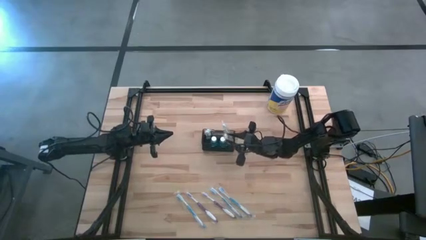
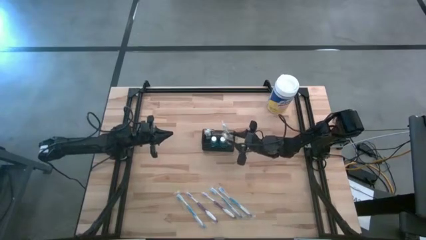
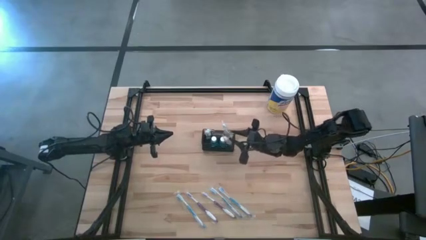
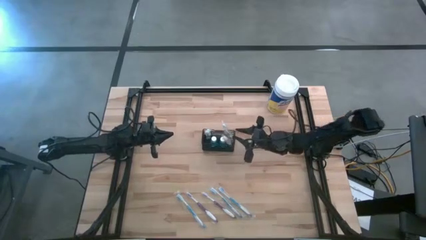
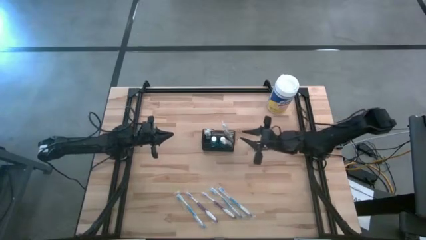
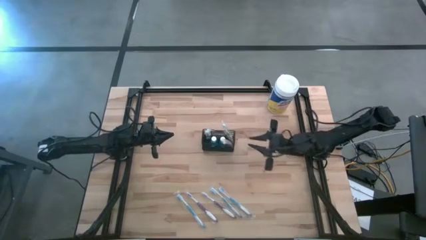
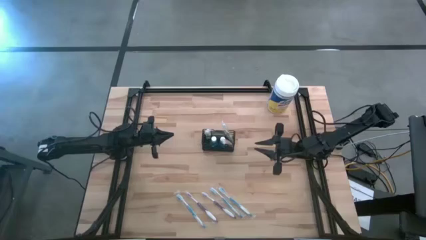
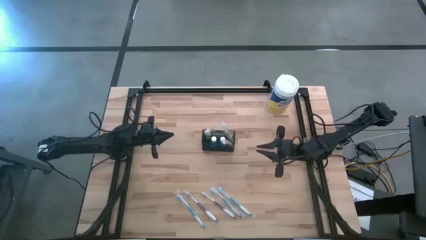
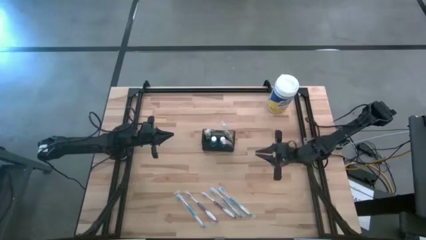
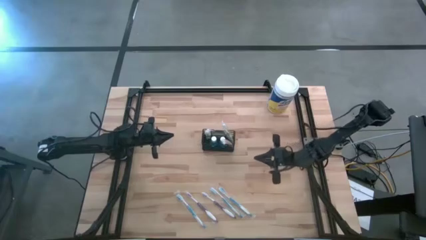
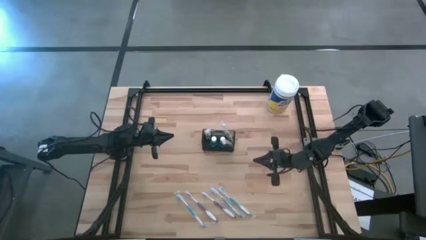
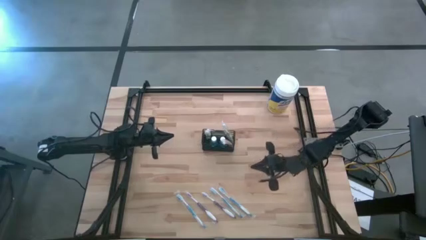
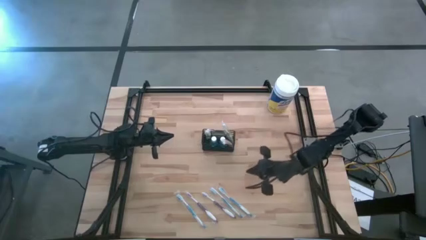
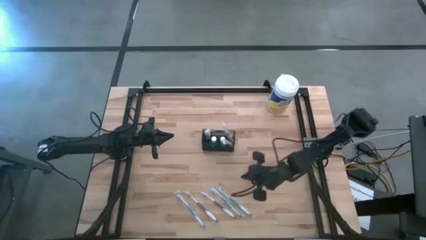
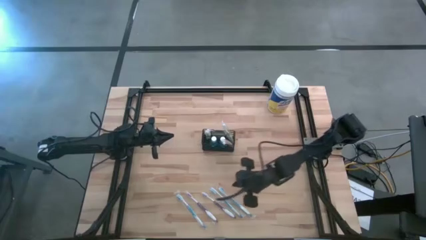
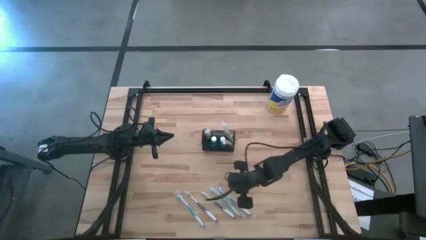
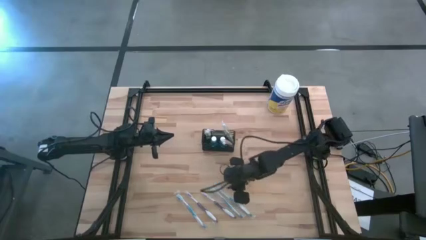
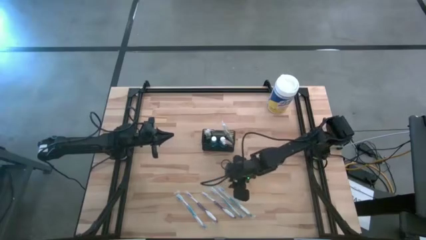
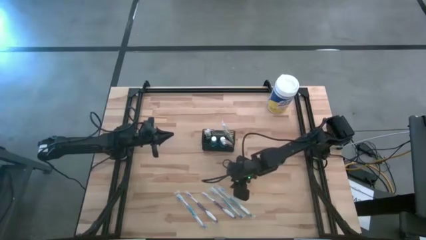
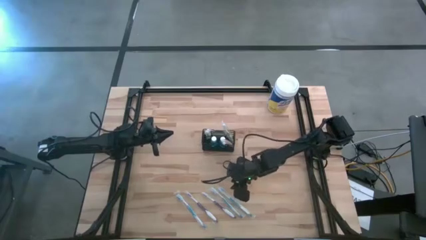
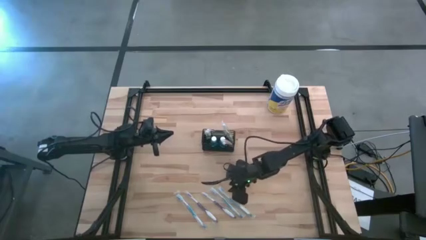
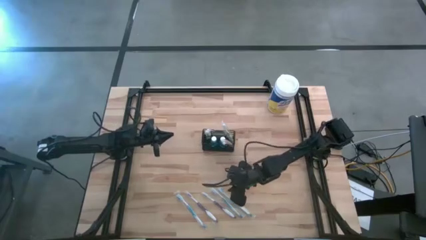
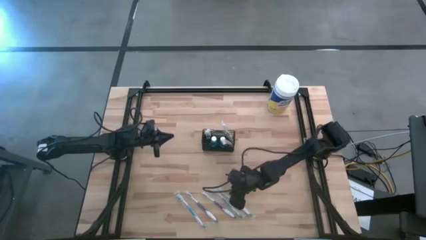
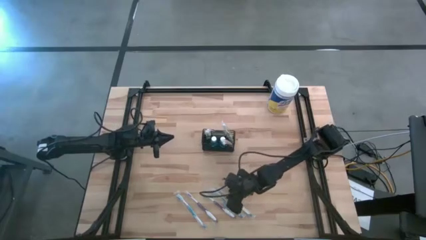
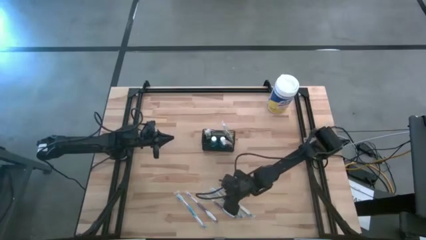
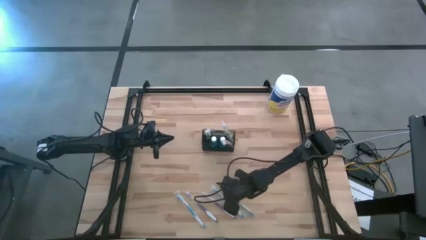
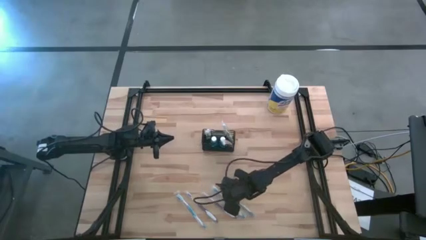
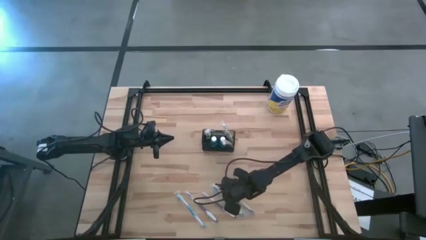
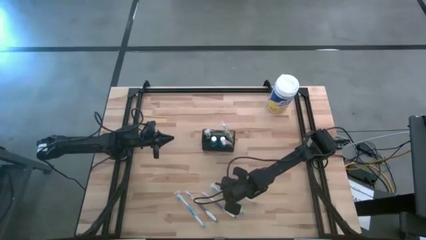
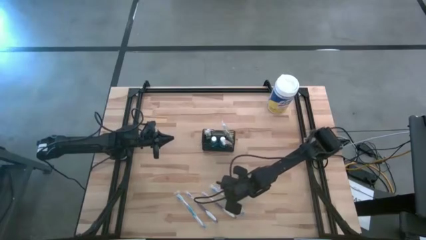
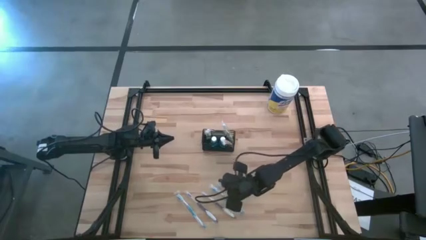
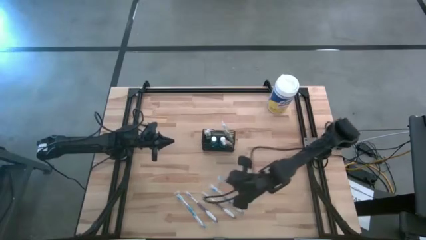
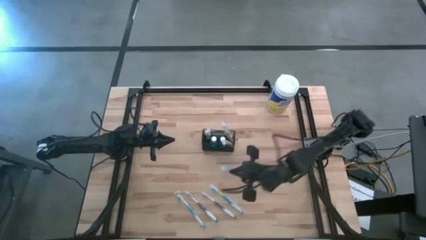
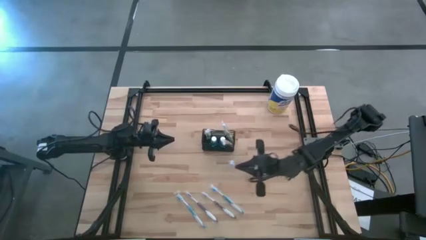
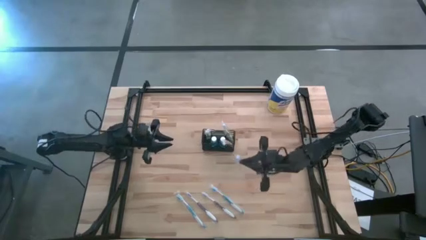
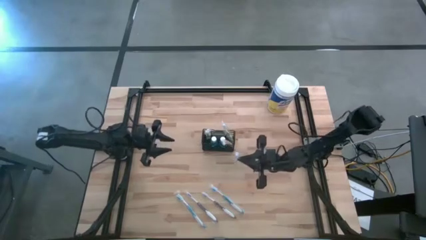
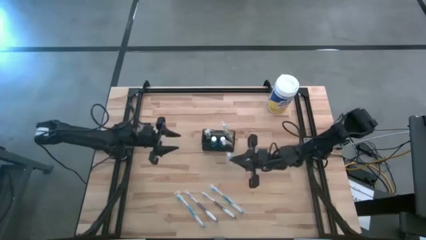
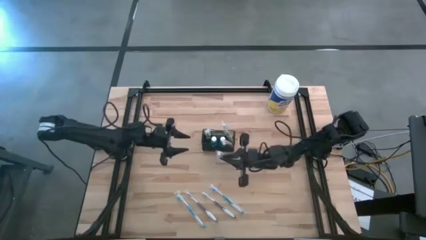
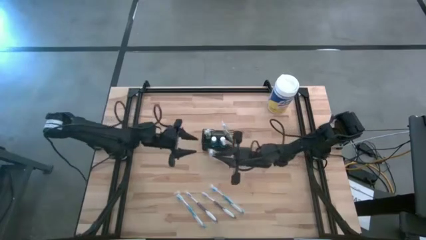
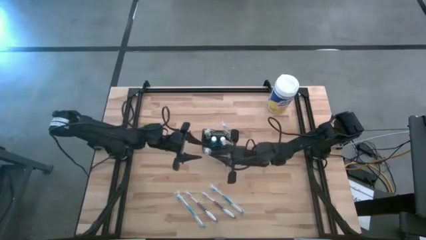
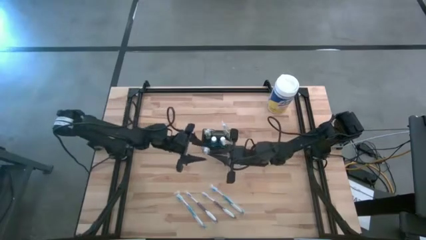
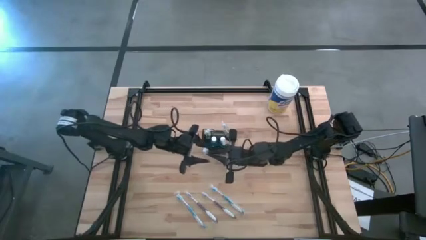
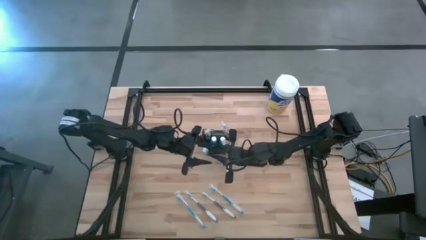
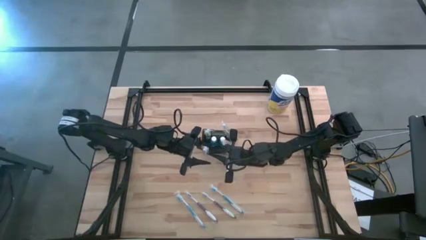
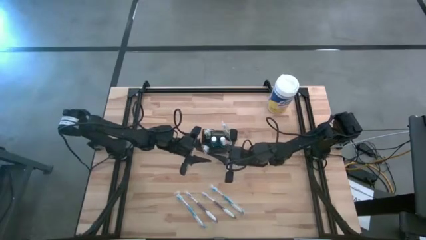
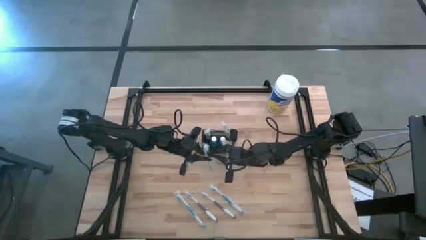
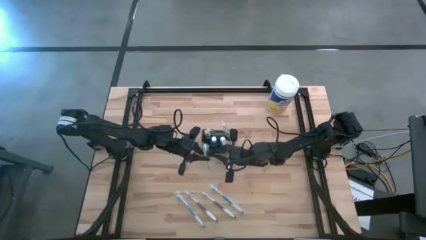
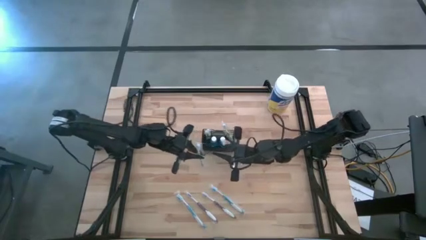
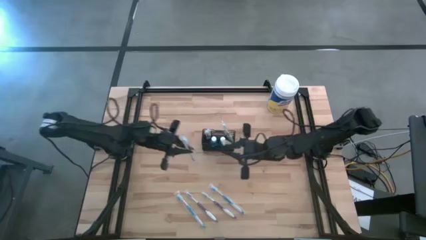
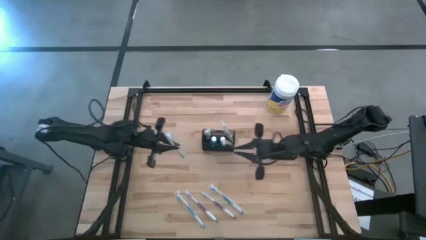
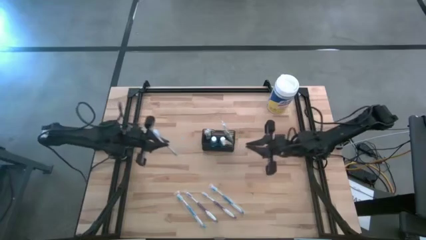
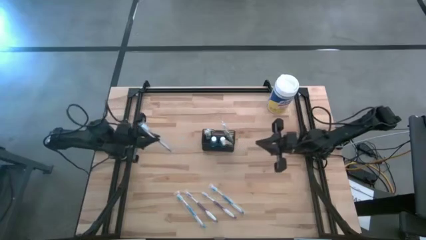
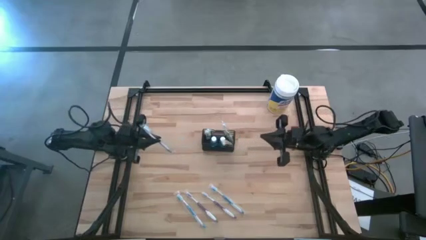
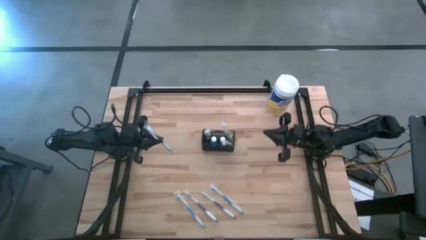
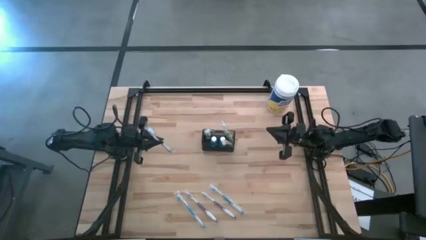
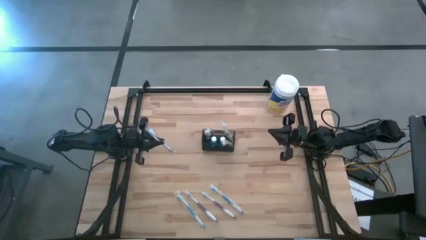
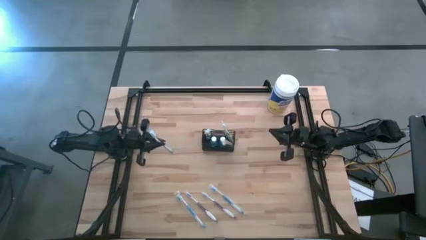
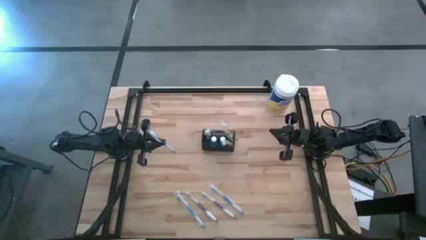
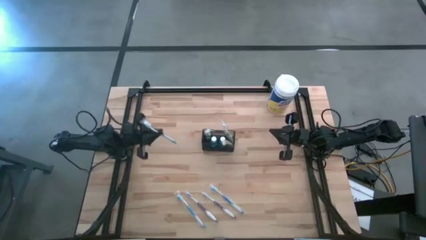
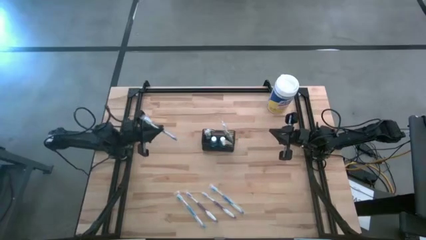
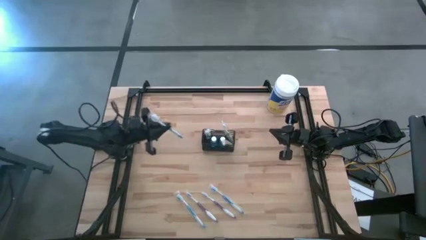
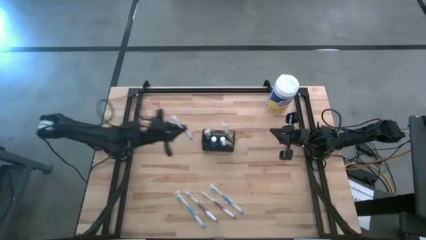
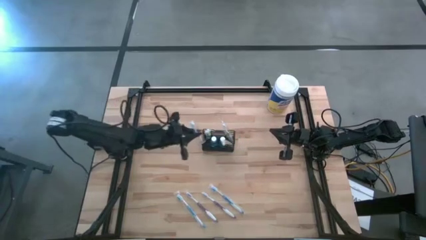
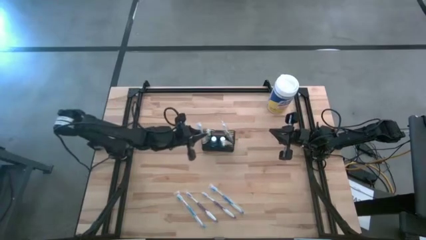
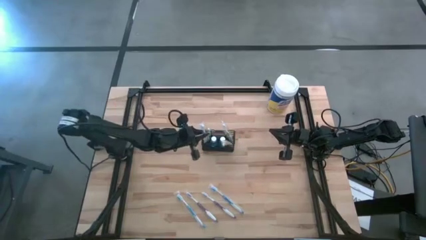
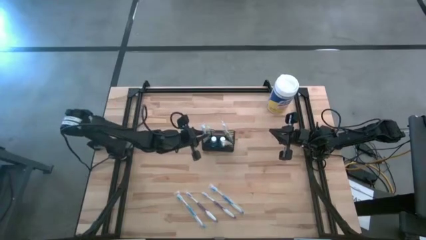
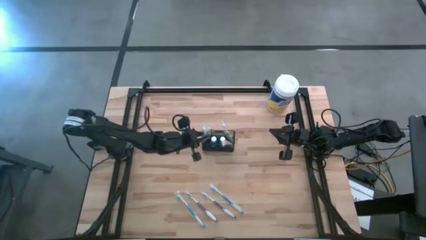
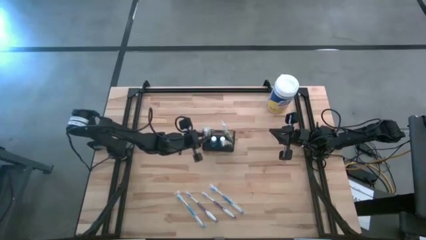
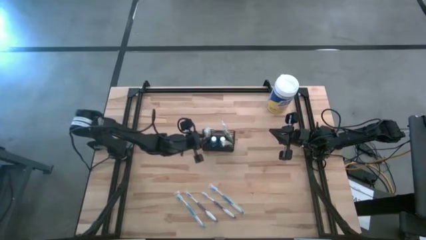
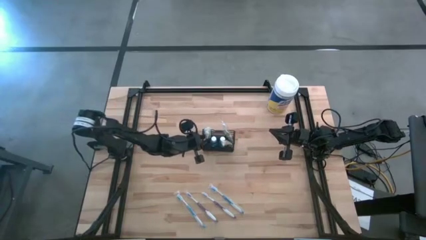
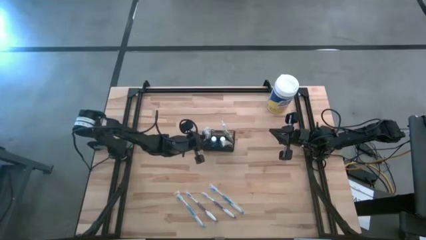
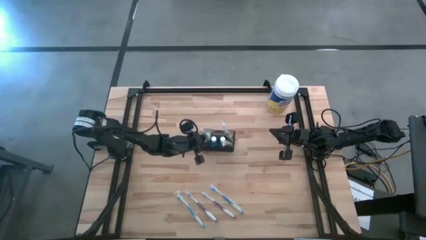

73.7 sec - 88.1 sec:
Task: Pick & Place toothbrushing station
Put the right blue toothbrush into the wire organizer

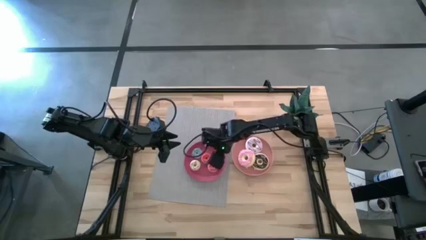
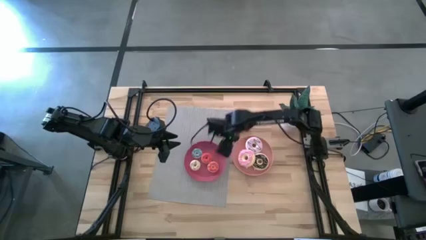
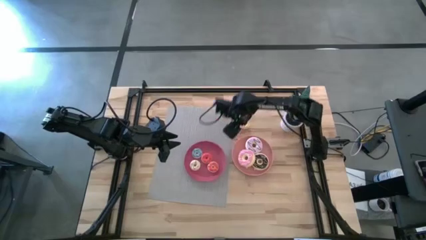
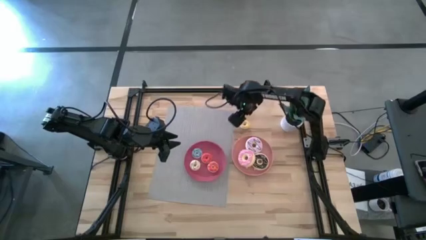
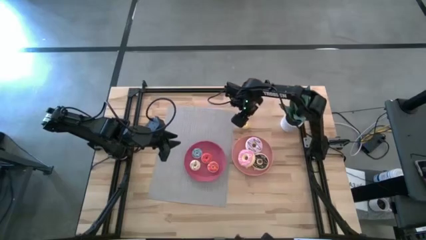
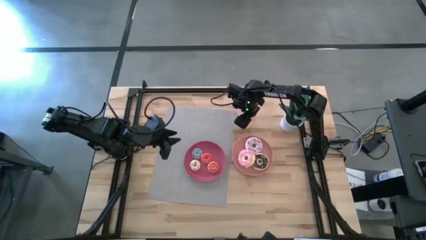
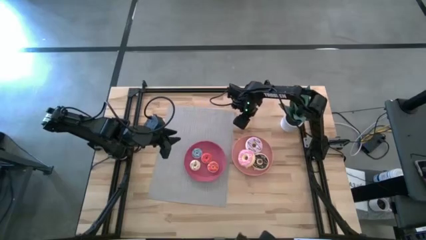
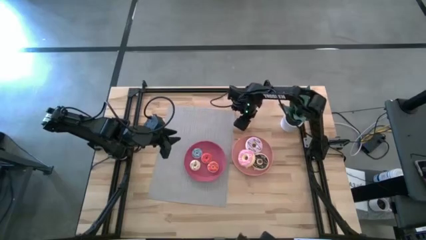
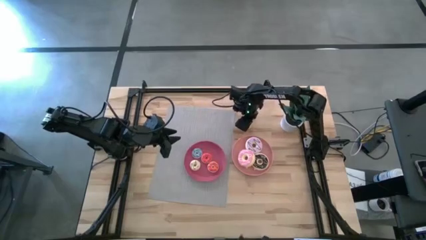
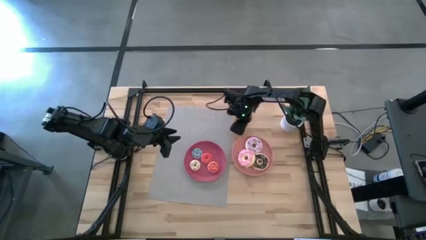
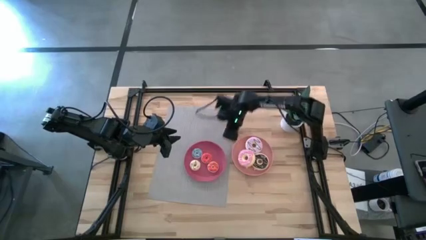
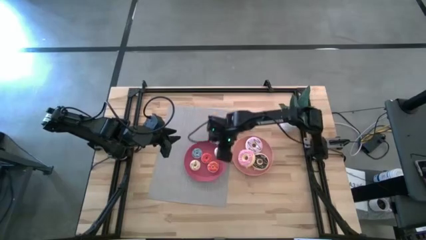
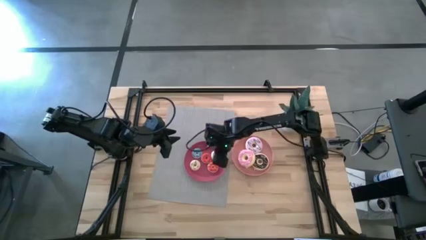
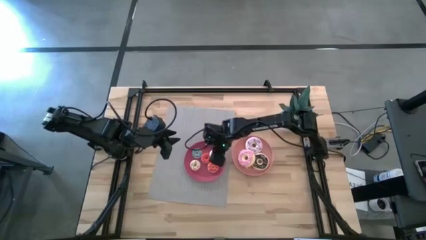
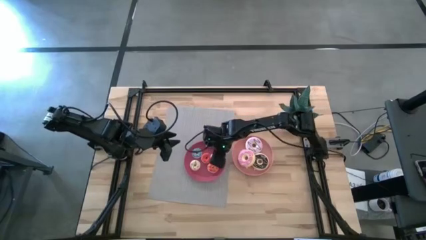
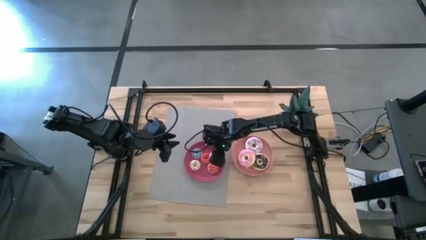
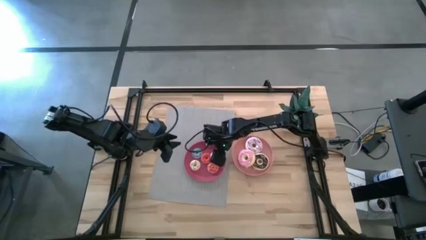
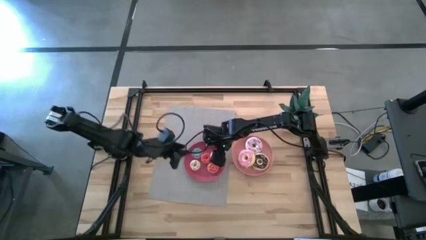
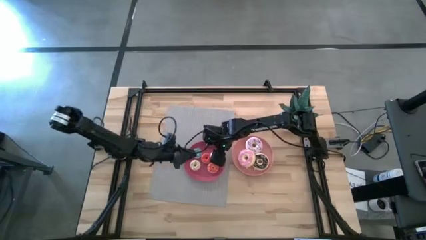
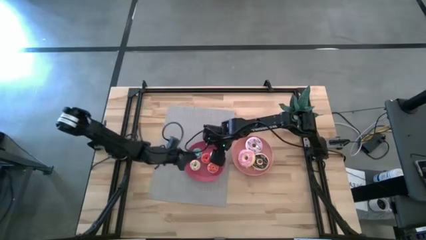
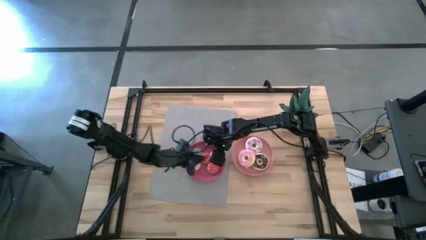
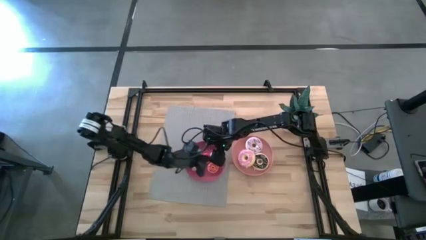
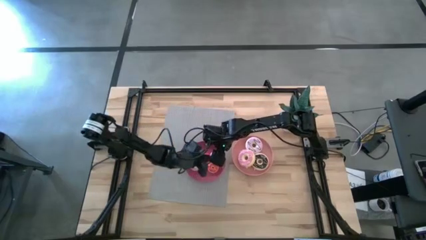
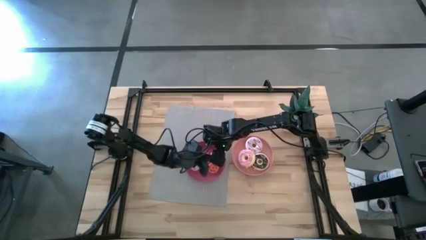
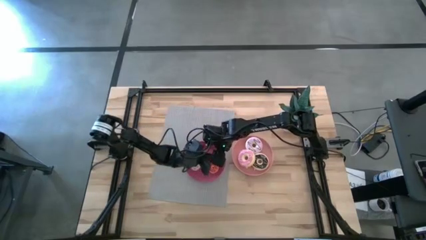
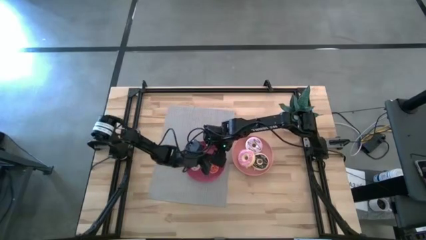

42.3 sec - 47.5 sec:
Task: Pick & Place donuts
Put the small yellow donut on the light pink plate
